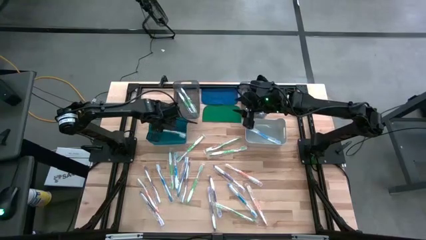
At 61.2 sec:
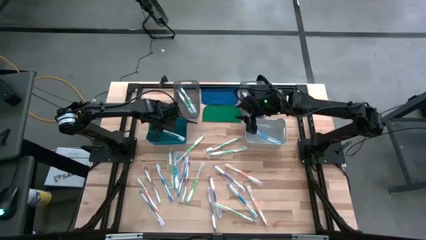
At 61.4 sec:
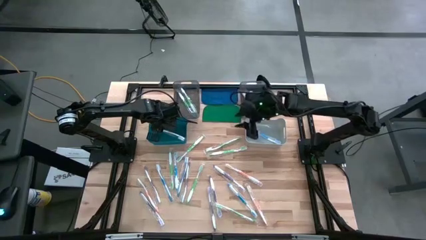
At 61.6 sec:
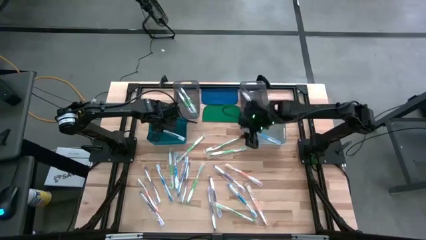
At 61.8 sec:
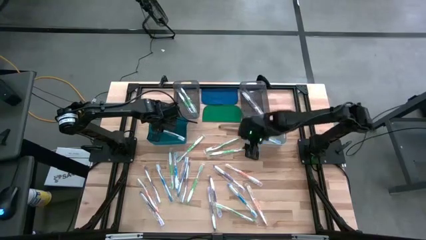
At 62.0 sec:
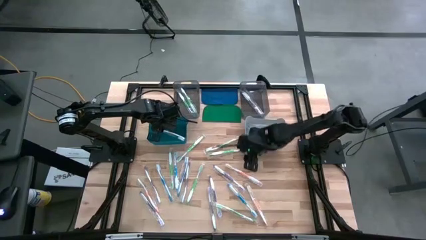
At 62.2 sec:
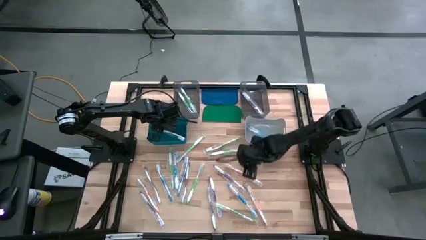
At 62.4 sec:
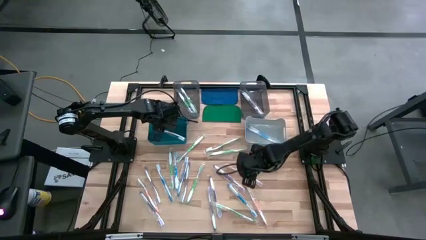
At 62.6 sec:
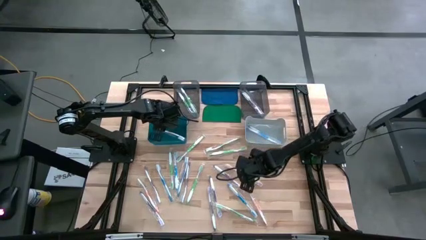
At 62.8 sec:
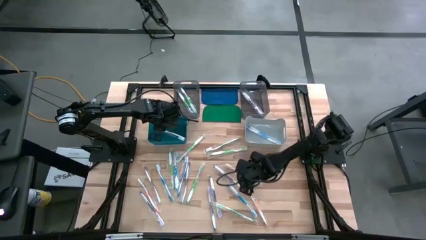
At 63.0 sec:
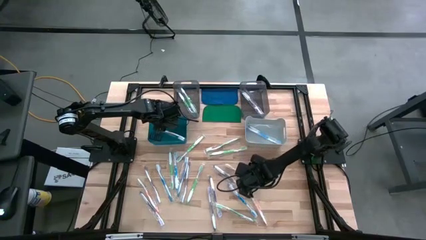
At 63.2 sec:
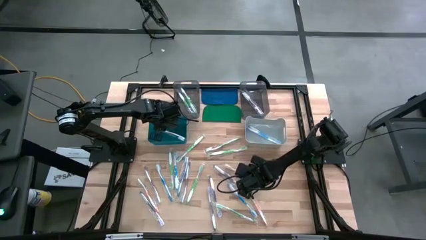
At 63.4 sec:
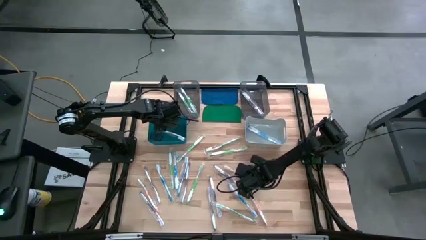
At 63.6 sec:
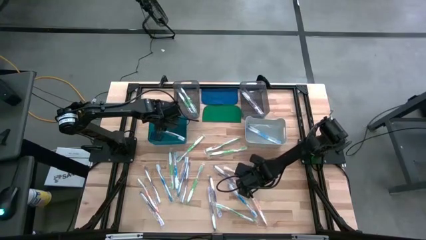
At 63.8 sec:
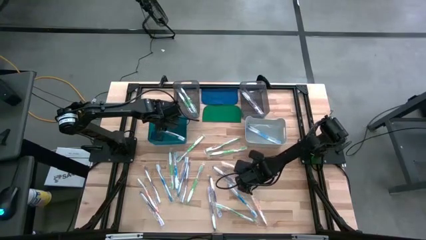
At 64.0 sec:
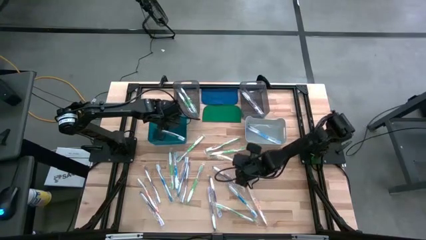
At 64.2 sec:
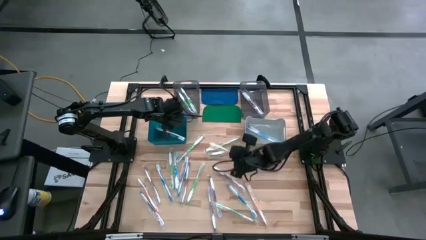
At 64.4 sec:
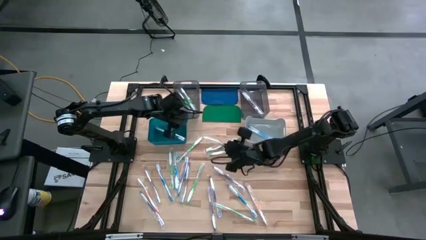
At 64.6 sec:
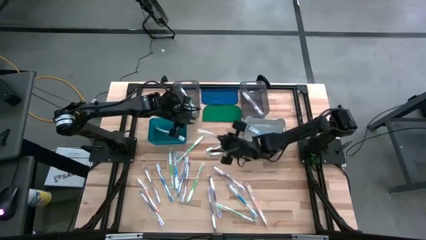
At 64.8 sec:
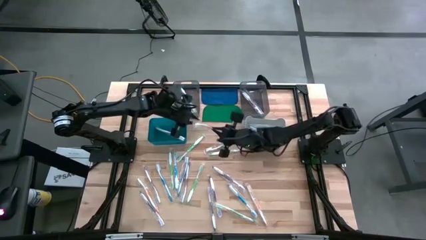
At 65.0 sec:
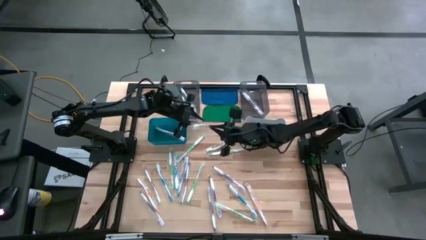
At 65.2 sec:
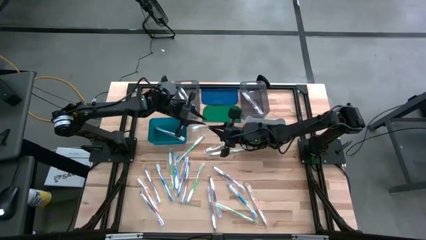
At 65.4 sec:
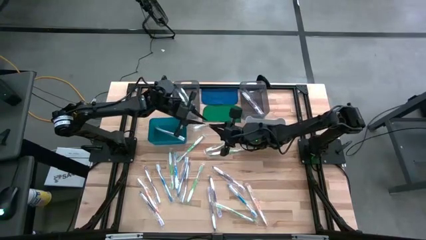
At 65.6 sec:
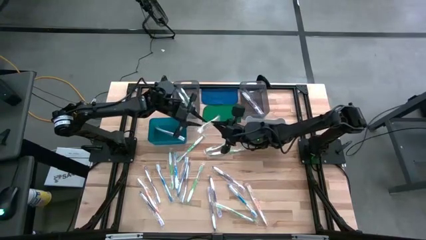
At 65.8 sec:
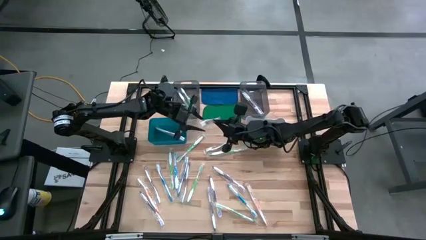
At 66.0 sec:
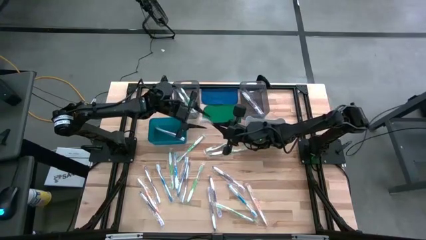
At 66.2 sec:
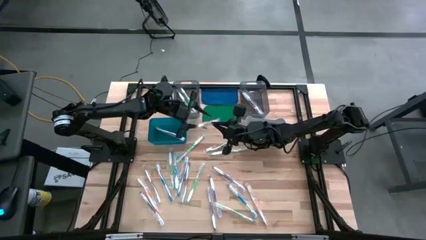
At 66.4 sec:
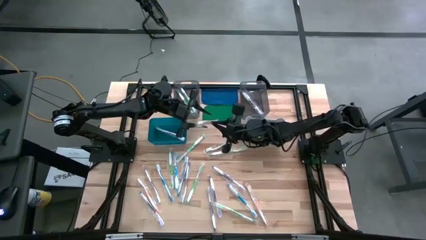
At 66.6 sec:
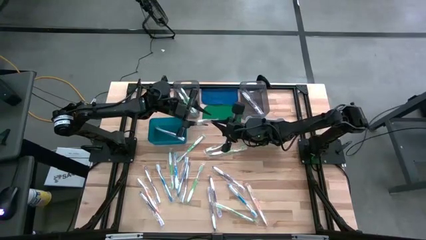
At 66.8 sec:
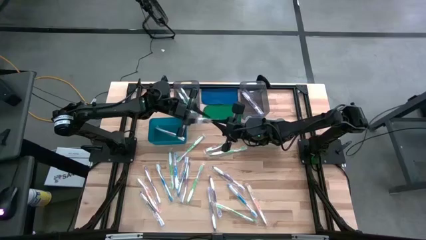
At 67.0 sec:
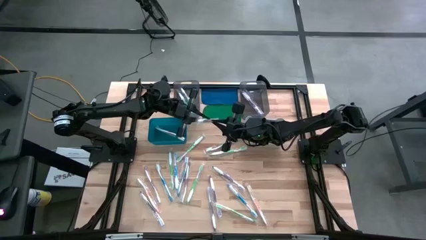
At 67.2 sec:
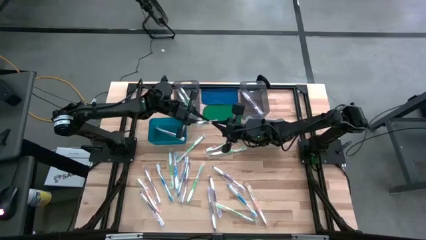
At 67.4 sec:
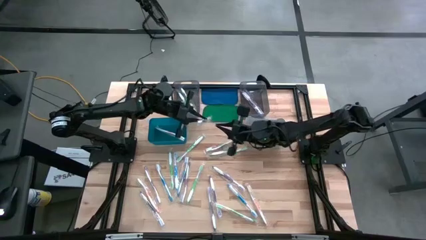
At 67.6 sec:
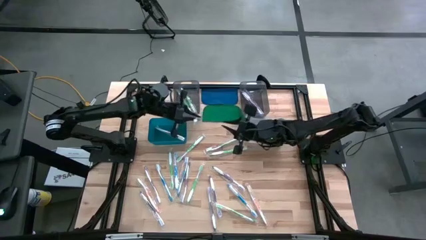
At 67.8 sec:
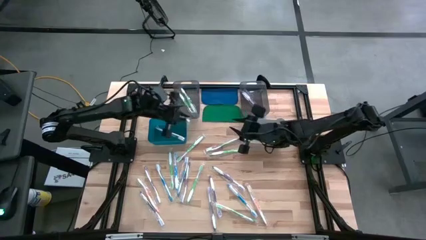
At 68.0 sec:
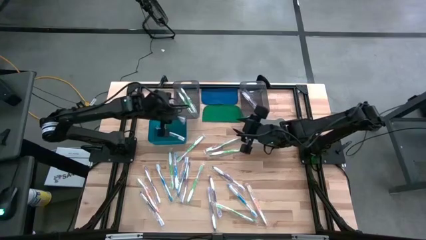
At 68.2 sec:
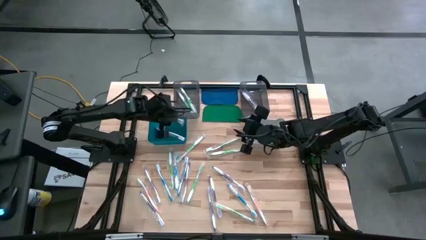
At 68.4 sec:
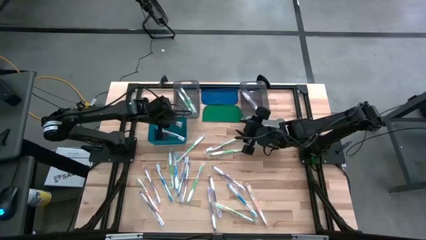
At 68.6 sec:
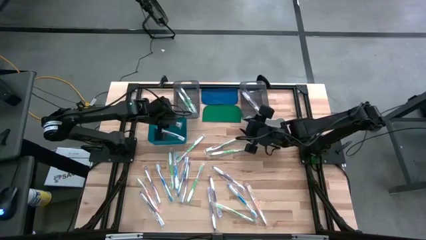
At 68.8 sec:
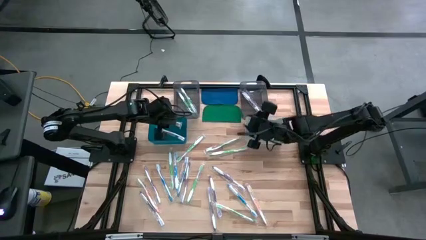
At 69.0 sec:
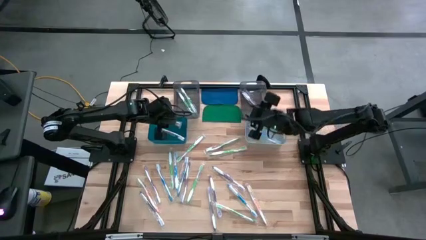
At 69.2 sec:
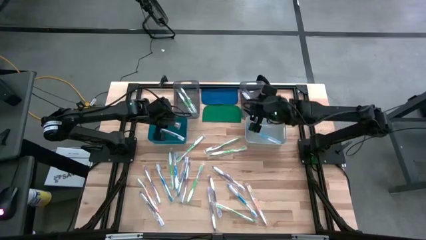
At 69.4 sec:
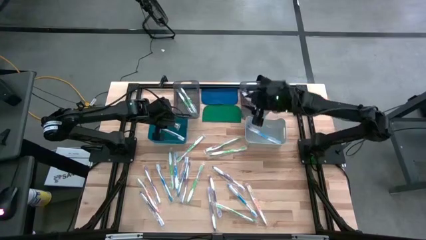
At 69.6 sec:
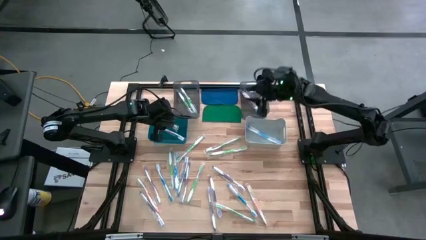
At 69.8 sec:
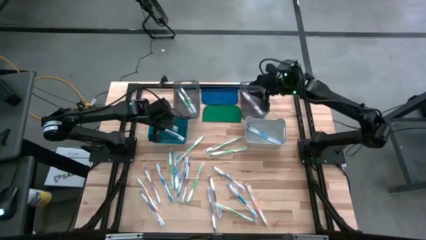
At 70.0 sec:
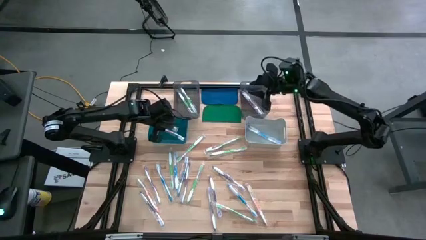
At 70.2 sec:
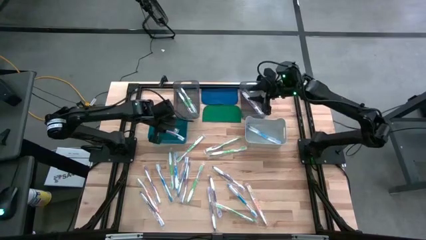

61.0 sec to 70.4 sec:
Task: Pick & Place Toothbrushes
Put the orange toothbrush into the blue bin

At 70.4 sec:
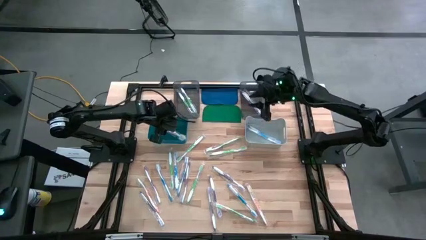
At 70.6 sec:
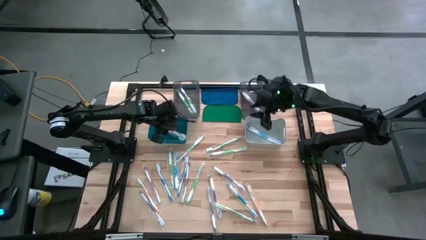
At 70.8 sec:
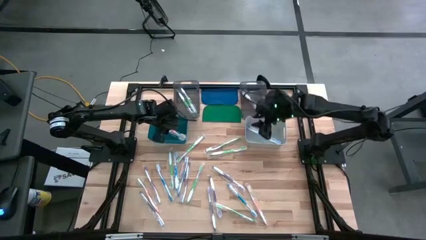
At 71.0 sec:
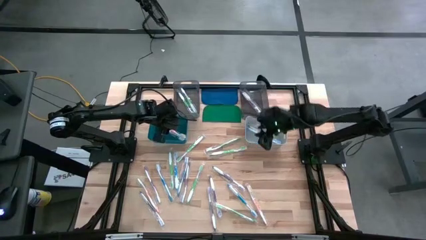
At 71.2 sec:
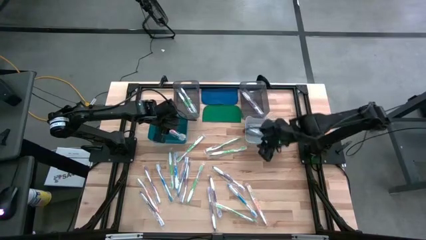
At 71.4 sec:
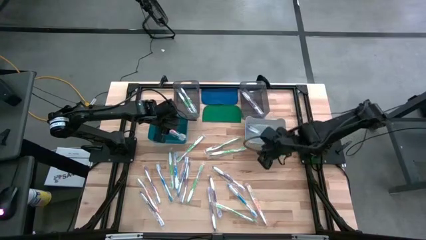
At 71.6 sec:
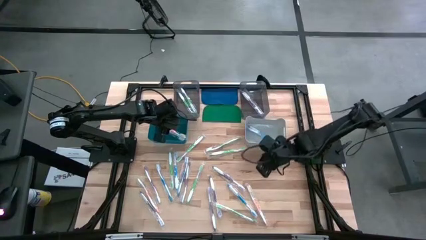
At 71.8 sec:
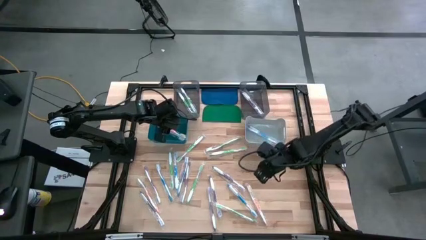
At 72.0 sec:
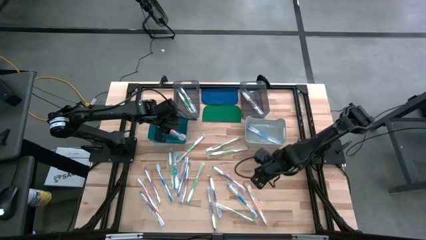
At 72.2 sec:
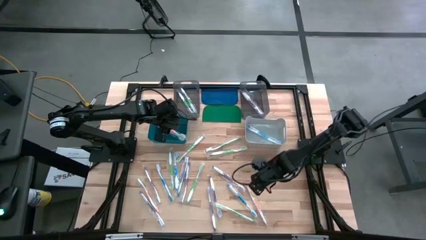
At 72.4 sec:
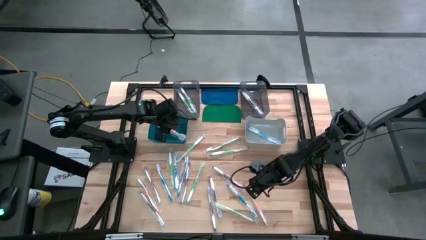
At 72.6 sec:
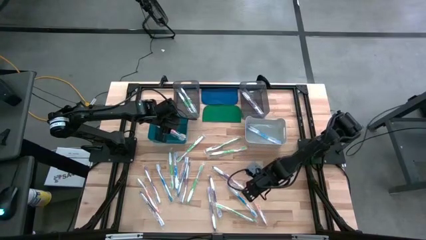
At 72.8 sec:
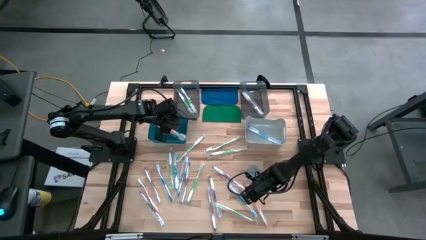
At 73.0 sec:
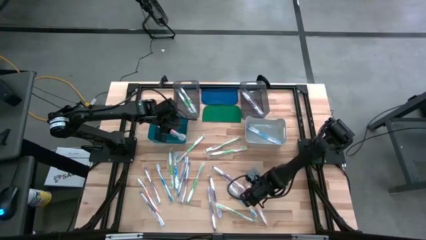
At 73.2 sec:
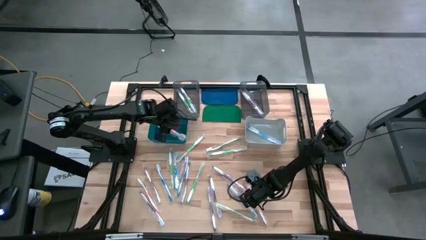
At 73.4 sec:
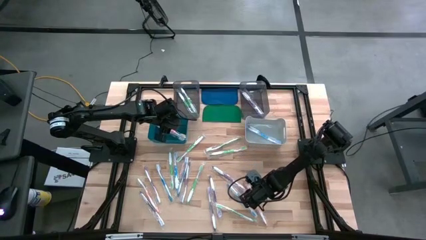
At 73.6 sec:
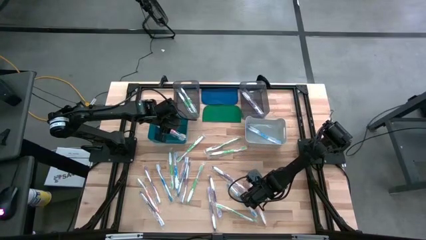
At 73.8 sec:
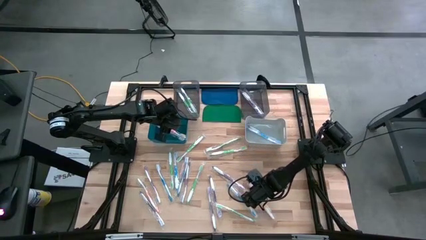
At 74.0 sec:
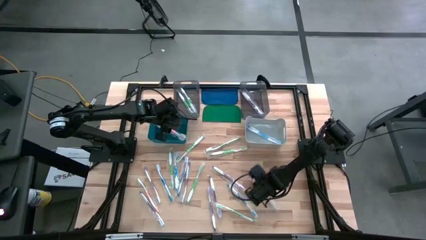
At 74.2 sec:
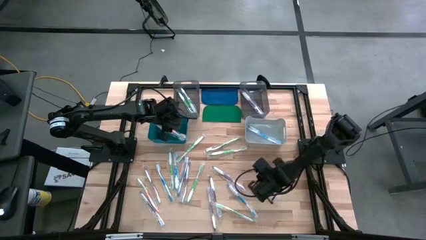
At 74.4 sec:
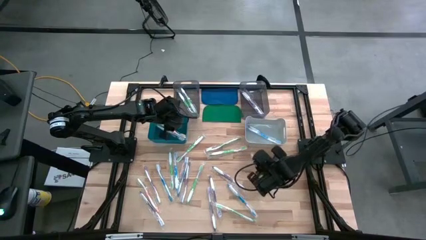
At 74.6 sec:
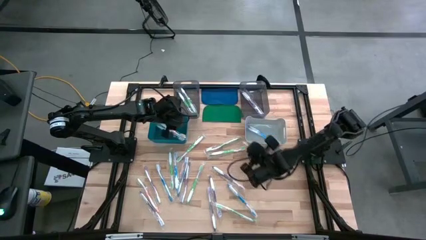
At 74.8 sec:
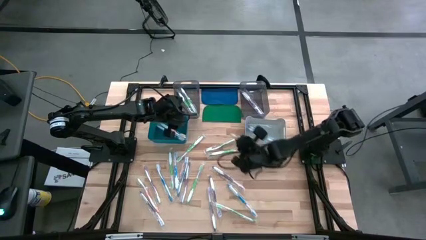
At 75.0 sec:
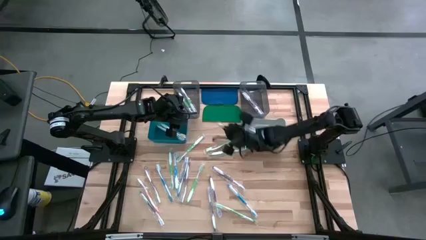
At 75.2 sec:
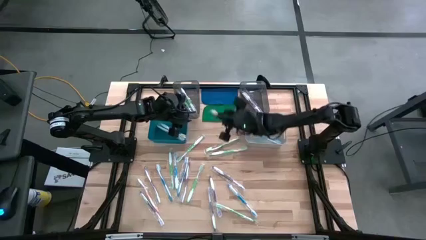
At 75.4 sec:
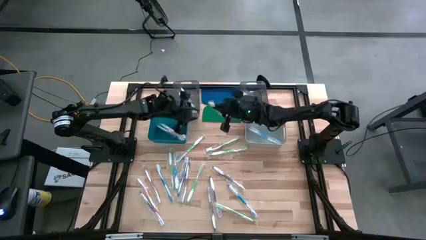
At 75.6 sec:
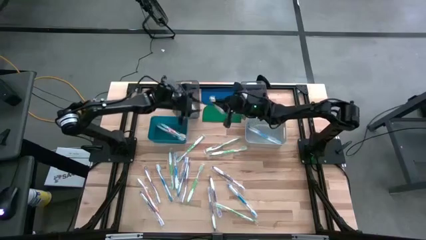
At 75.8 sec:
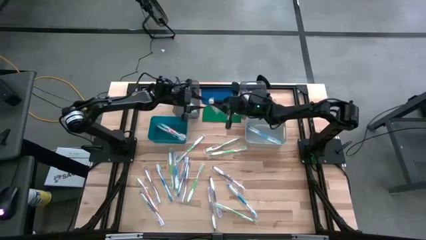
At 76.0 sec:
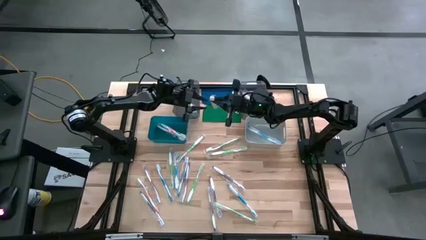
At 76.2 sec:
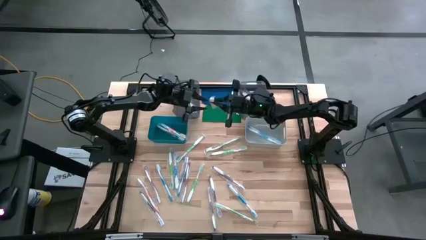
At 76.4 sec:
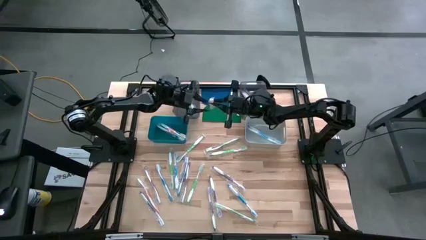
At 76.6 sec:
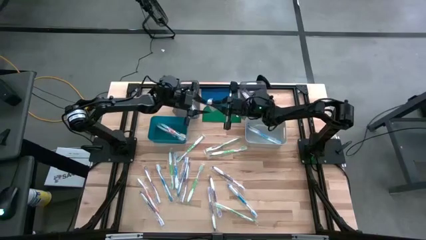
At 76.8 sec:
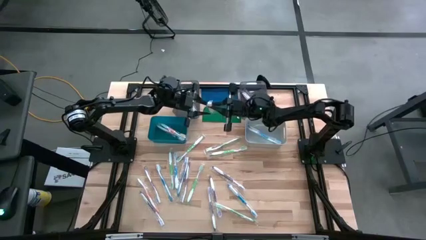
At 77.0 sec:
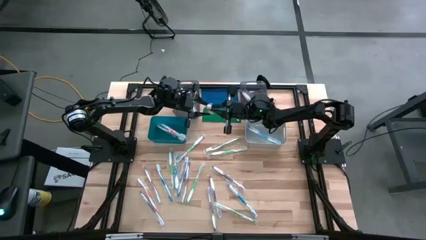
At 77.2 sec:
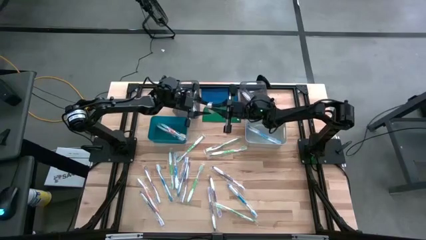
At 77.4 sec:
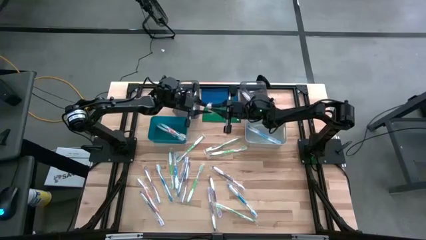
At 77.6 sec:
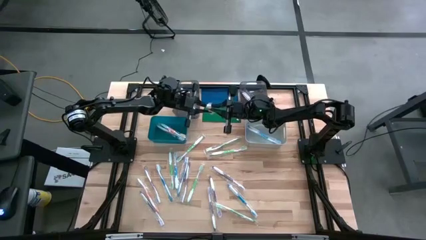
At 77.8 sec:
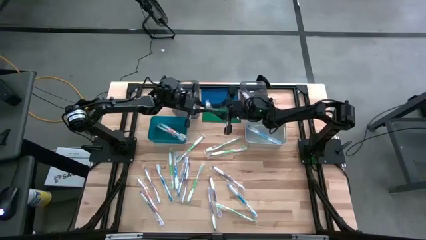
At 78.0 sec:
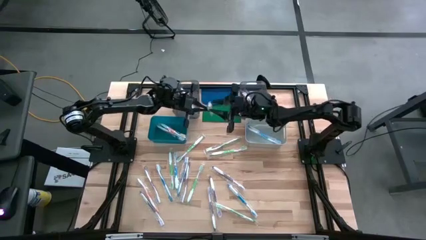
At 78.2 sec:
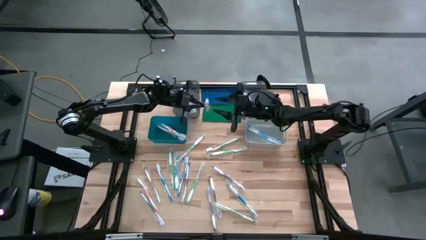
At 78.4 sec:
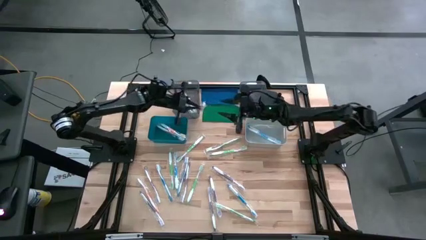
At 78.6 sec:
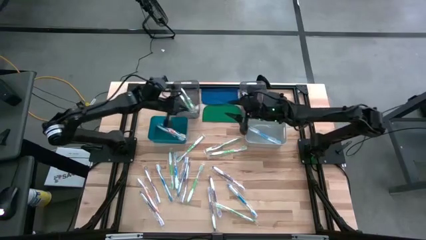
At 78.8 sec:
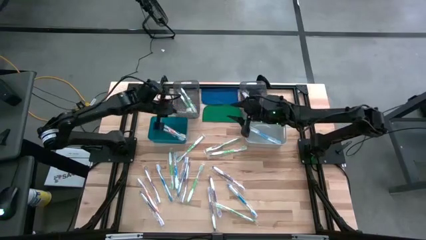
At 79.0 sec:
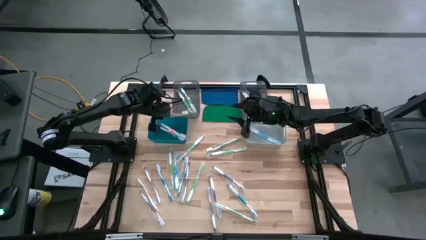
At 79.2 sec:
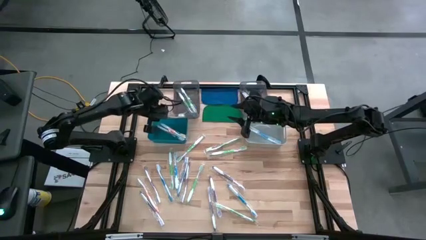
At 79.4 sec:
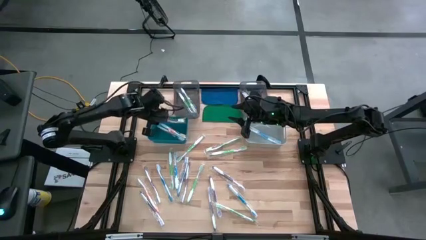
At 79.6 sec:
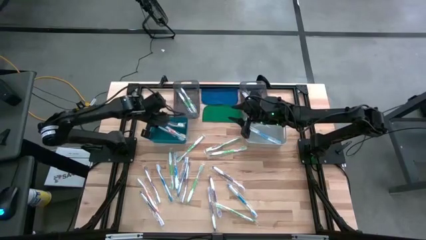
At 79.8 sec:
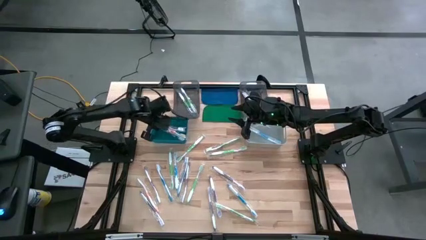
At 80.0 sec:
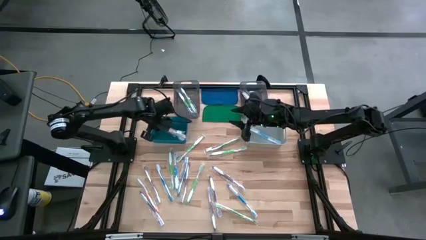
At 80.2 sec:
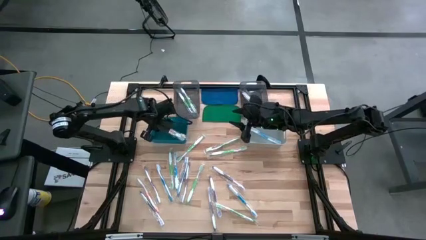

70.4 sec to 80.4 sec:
Put the orange toothbrush into the blue bin
